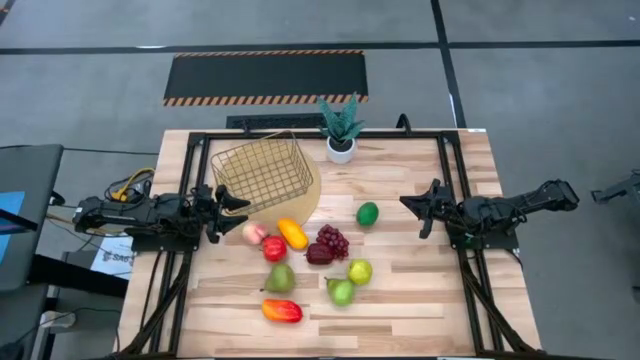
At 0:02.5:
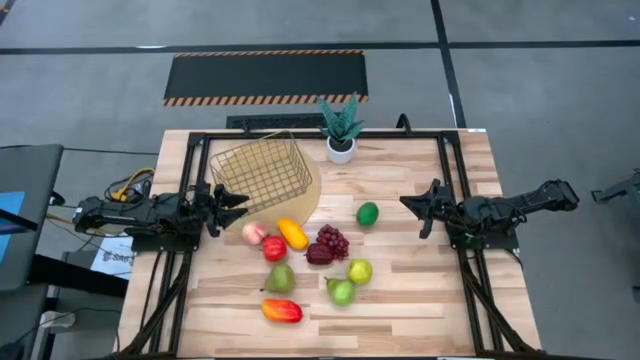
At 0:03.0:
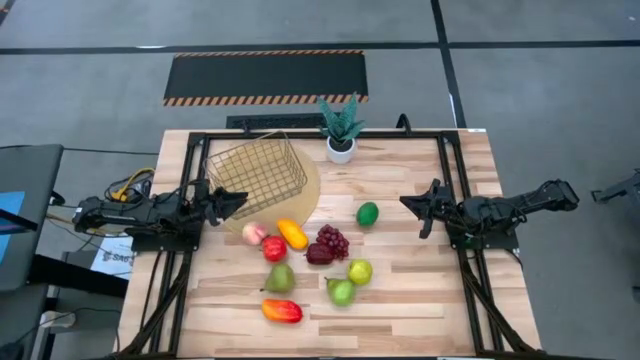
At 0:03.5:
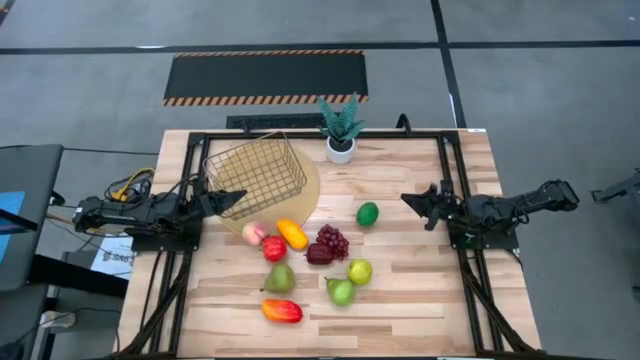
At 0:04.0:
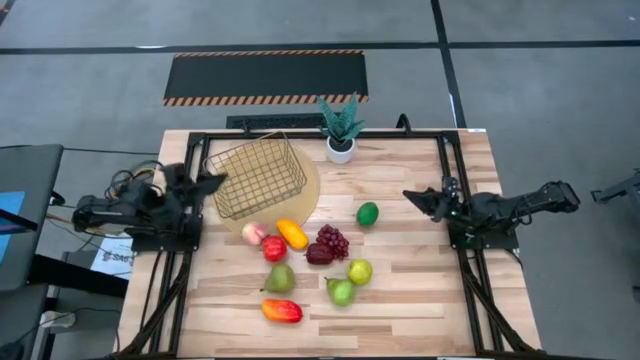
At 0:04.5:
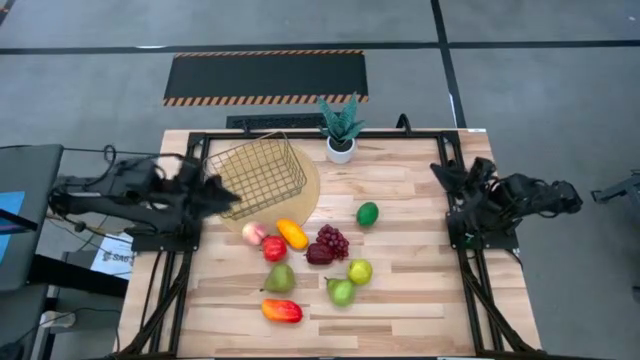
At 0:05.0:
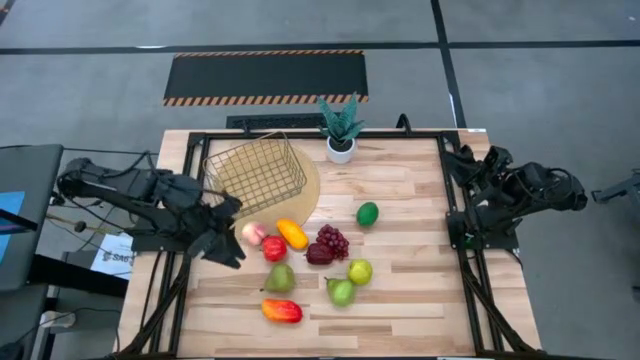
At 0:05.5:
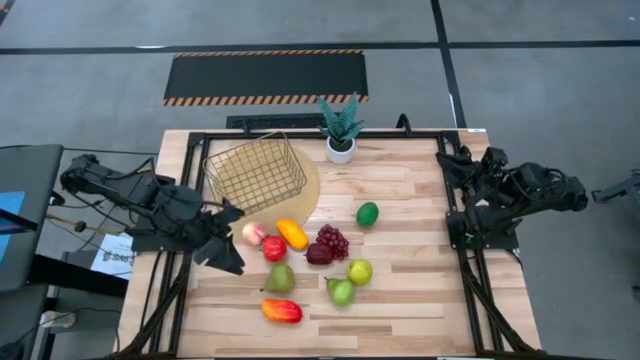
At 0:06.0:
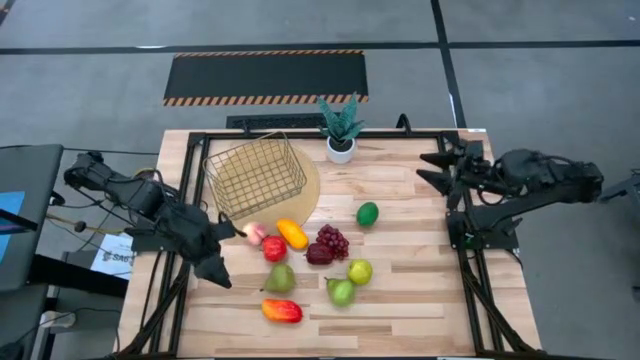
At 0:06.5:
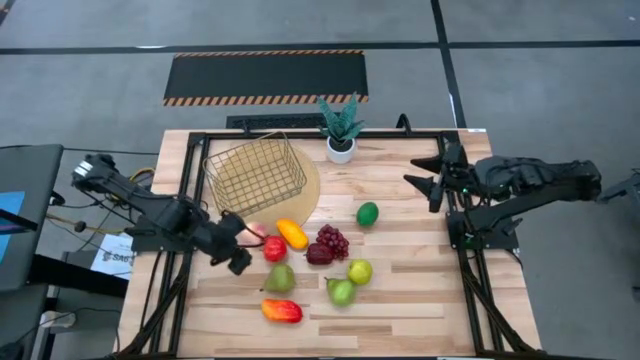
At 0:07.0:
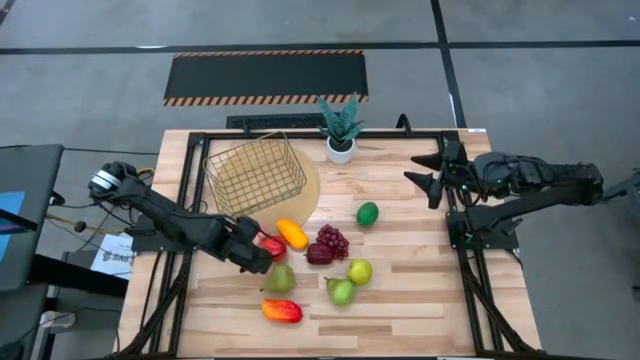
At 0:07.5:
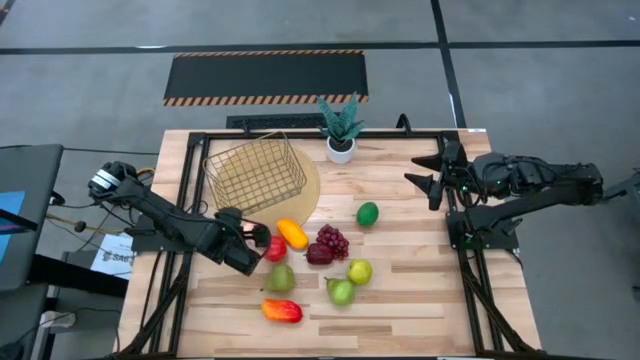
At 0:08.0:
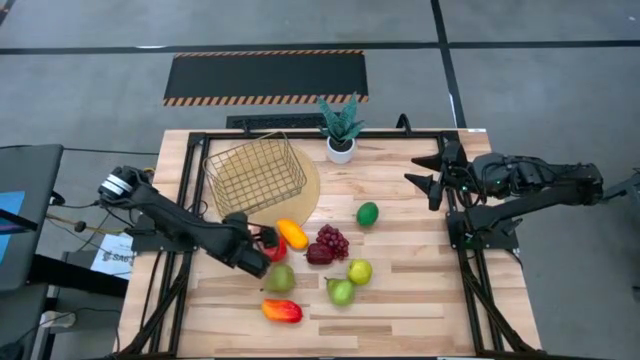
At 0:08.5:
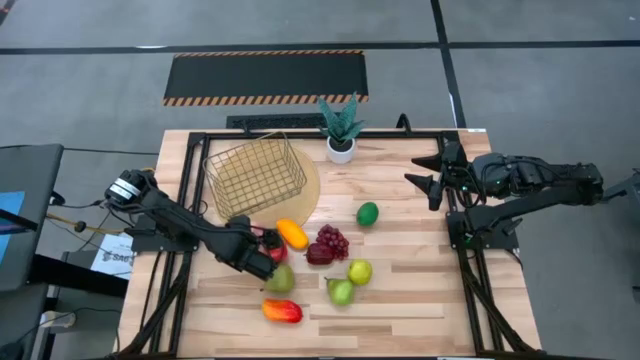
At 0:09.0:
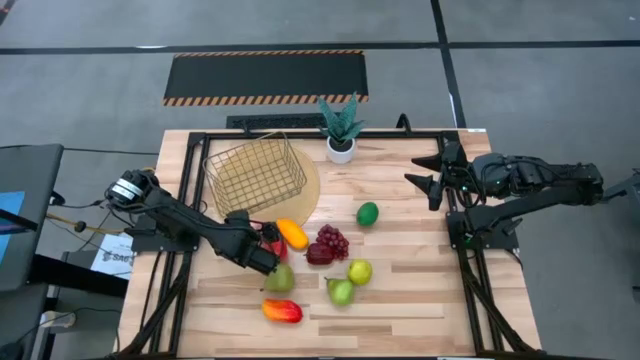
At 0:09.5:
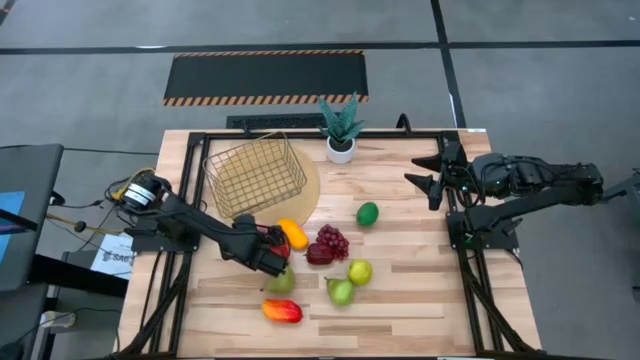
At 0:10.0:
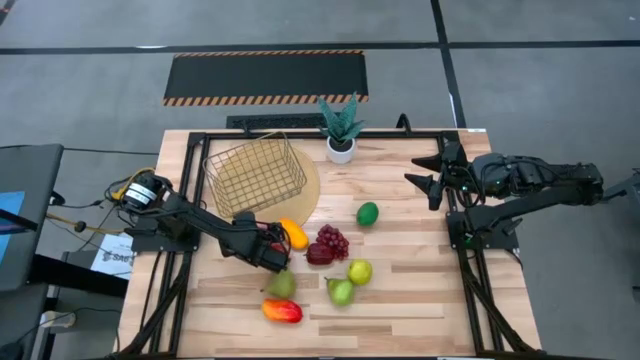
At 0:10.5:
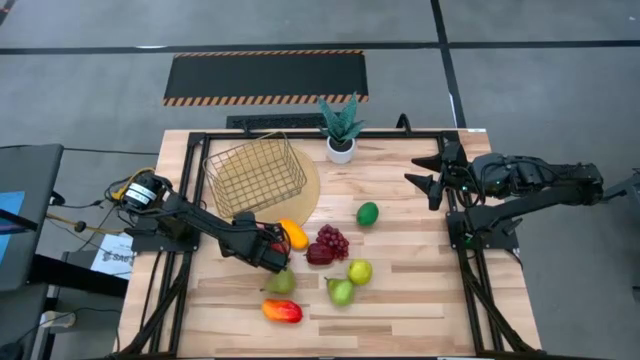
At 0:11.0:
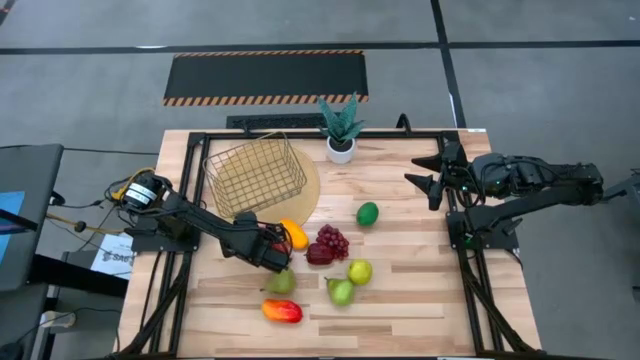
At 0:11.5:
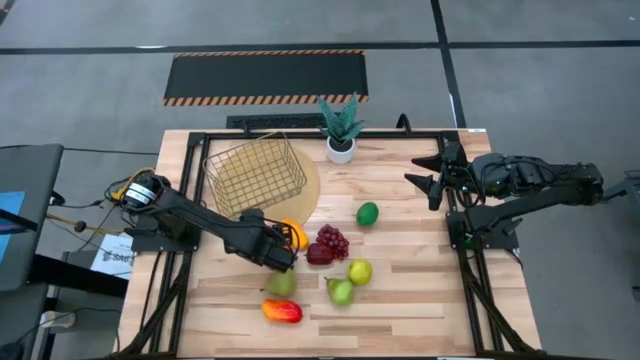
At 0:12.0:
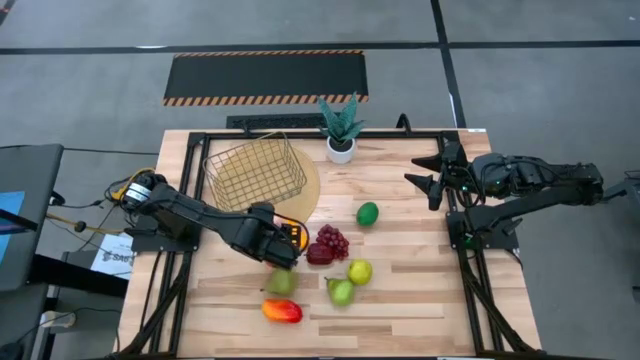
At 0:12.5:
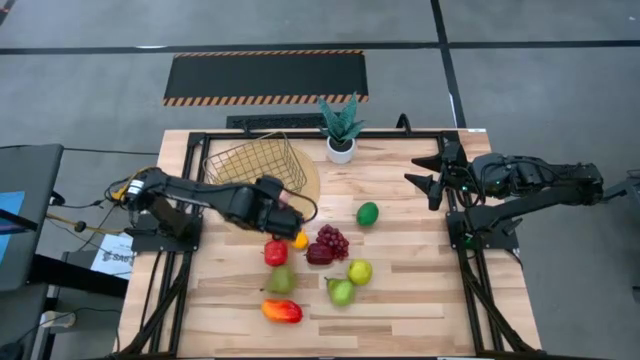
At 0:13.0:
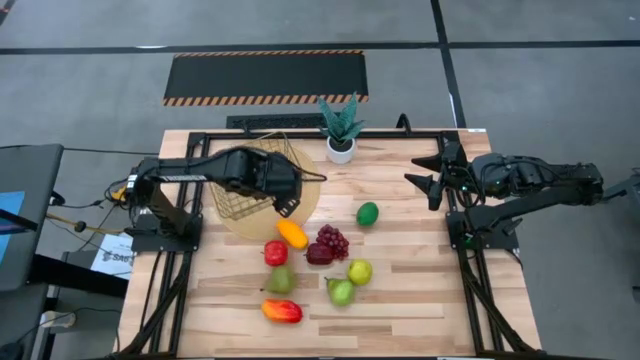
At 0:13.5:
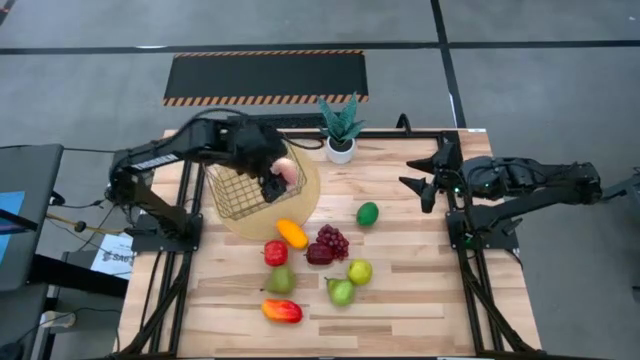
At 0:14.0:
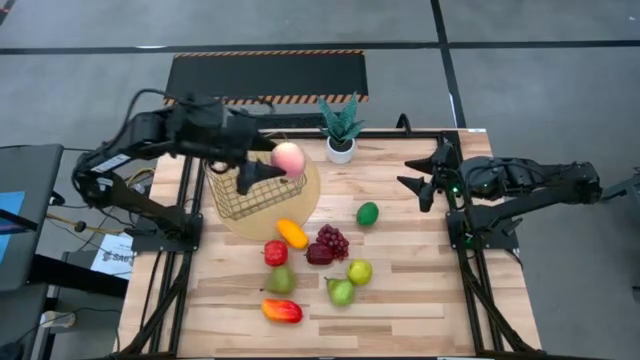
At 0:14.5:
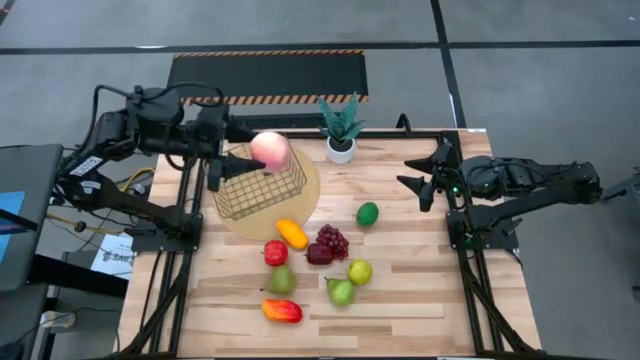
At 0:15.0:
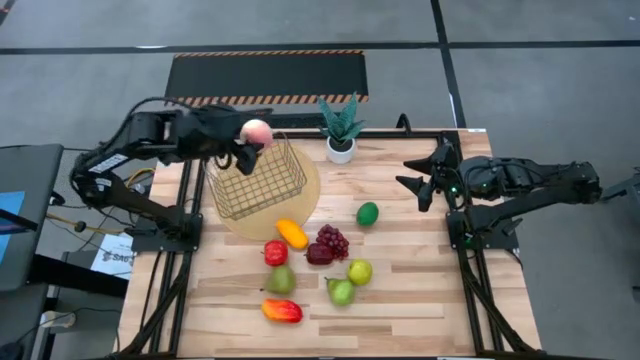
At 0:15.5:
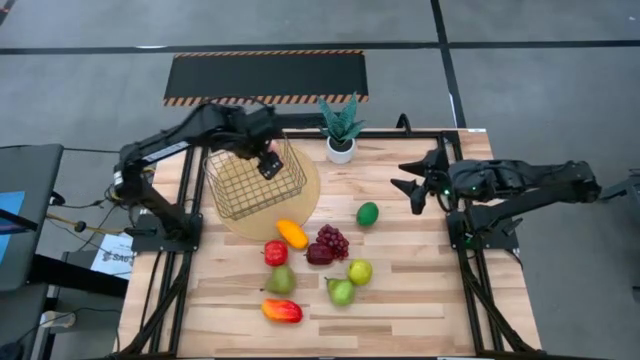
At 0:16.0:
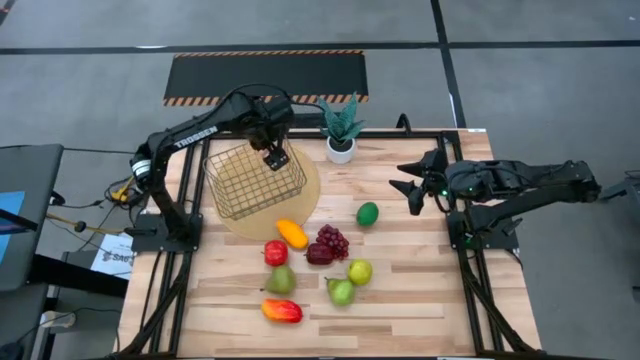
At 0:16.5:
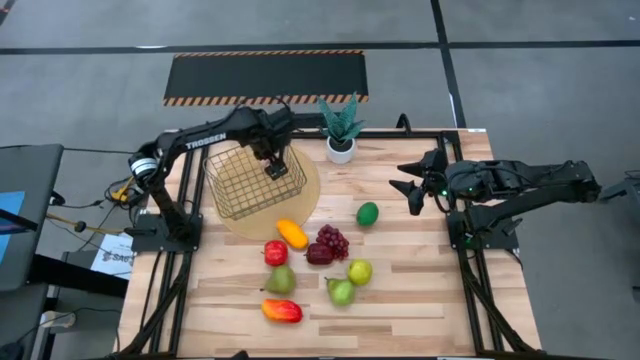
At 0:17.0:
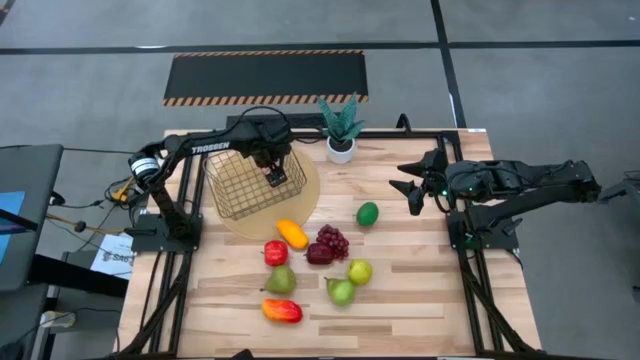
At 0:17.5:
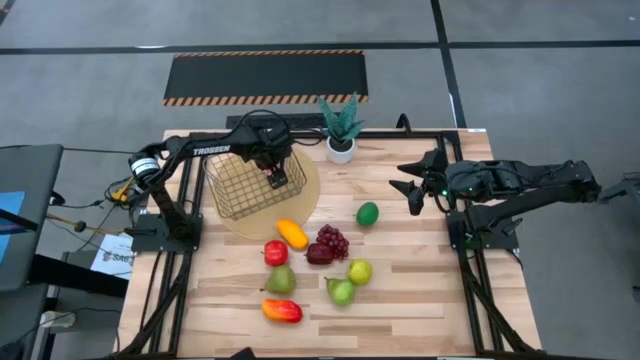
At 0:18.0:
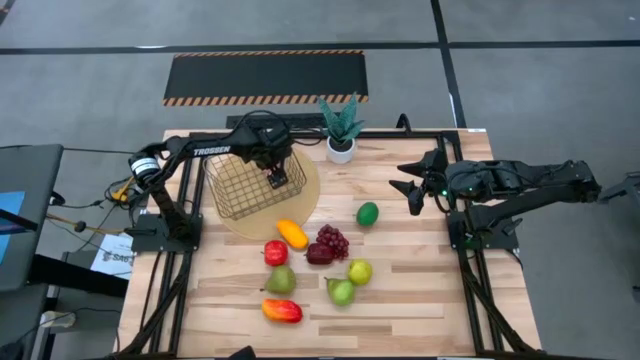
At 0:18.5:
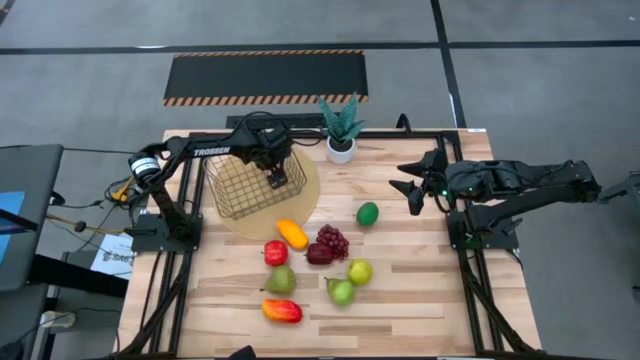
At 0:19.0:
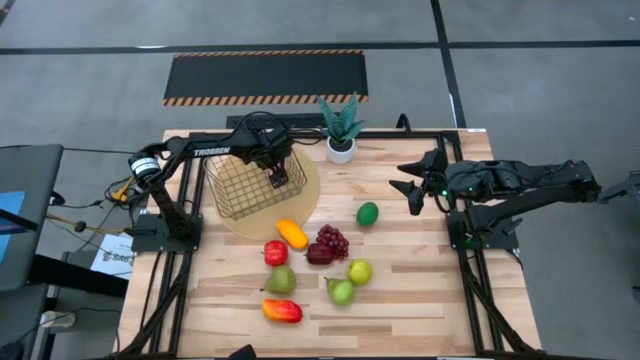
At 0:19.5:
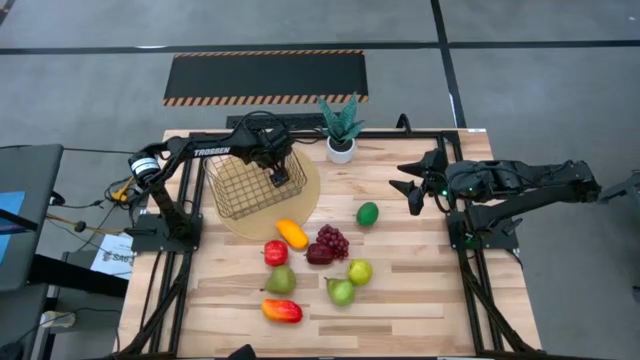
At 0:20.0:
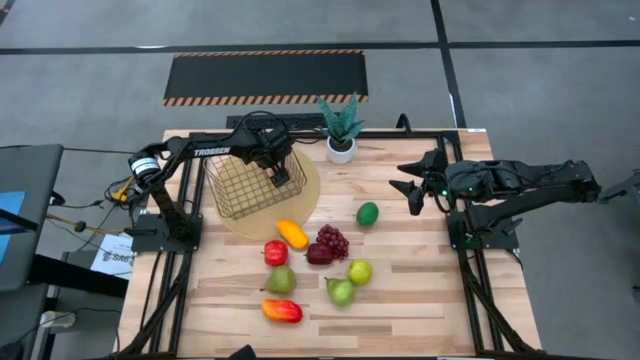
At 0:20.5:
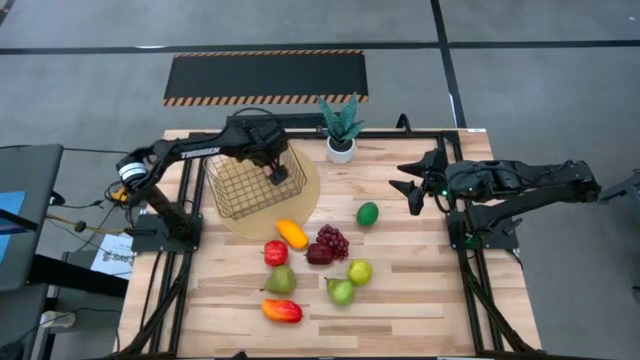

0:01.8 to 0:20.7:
Task: Build produce basket
Put the peach into the wire basket

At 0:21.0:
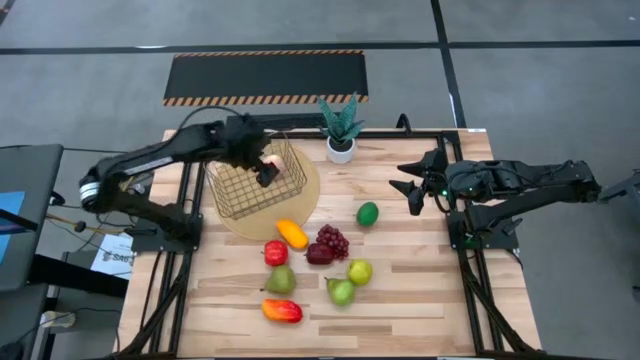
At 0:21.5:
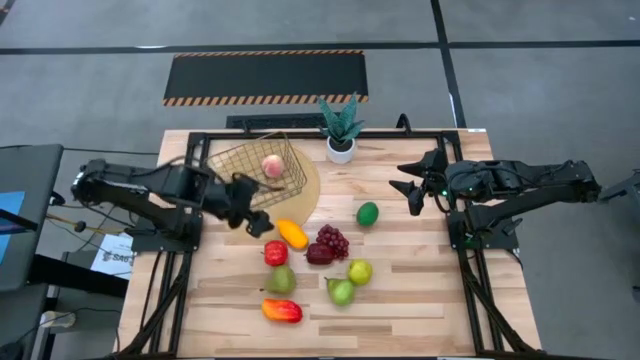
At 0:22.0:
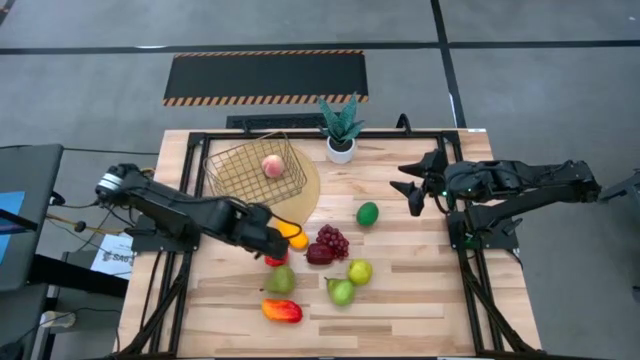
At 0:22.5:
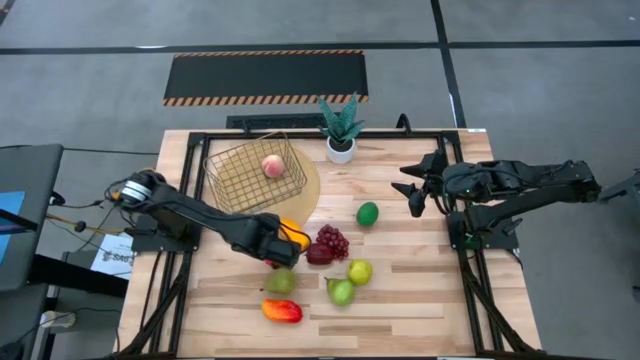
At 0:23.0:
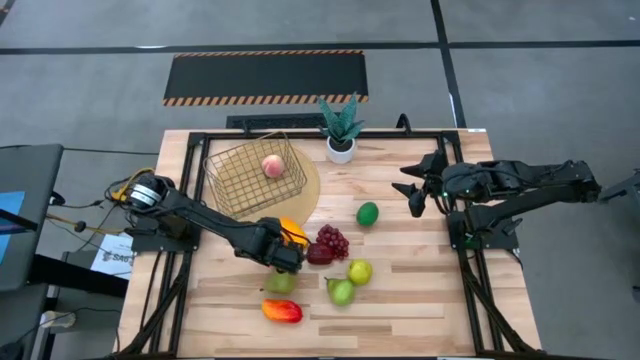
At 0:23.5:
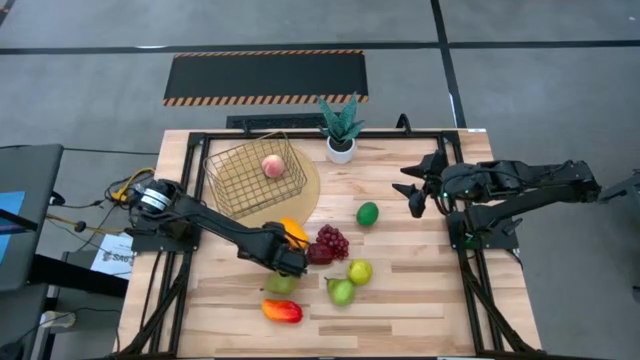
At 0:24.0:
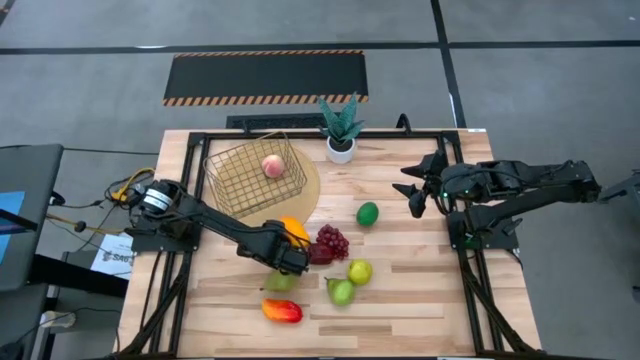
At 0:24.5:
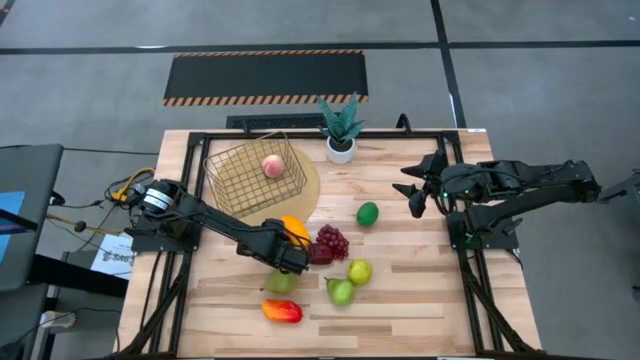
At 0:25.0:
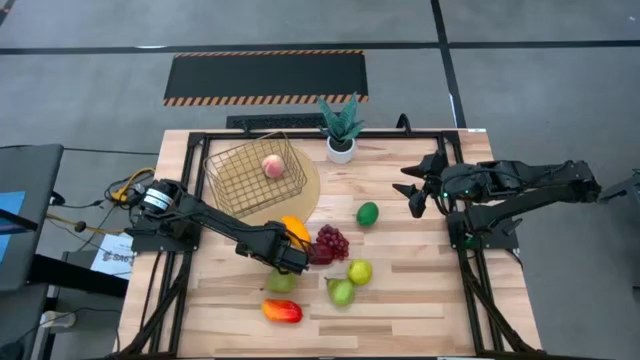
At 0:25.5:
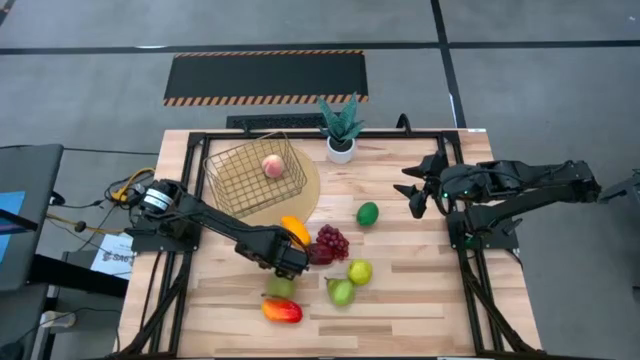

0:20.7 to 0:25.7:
Put the red apple into the wire basket
